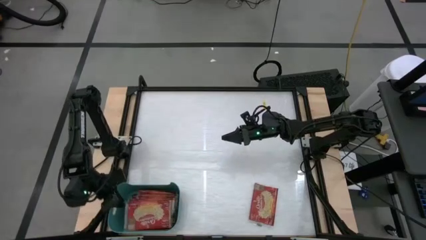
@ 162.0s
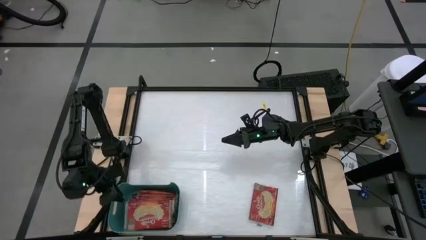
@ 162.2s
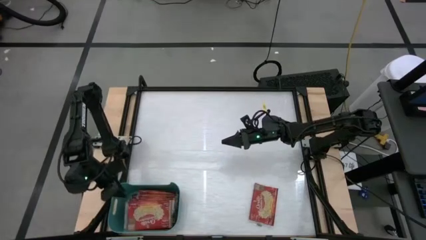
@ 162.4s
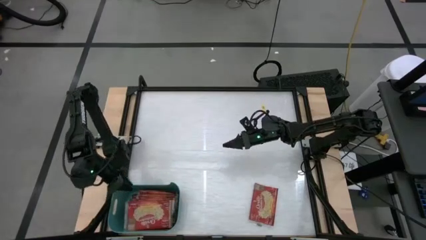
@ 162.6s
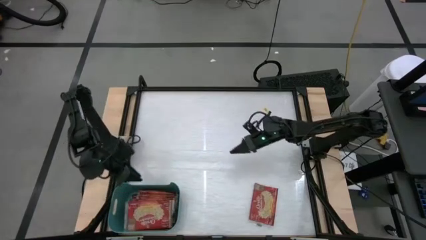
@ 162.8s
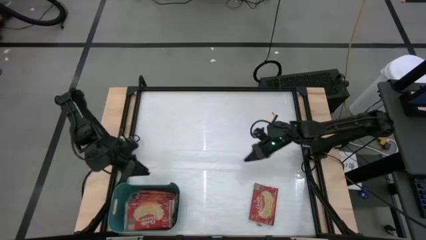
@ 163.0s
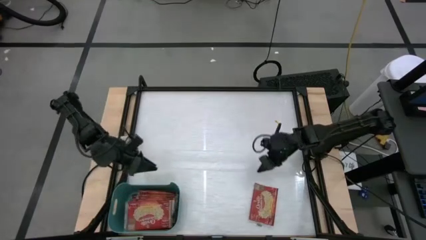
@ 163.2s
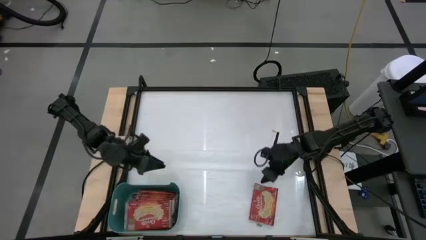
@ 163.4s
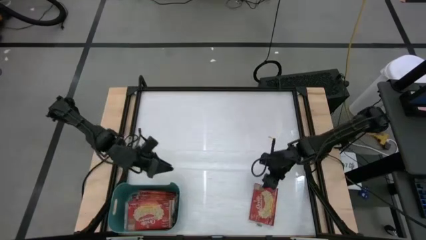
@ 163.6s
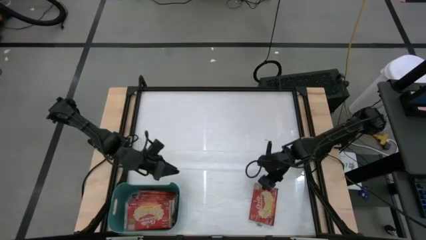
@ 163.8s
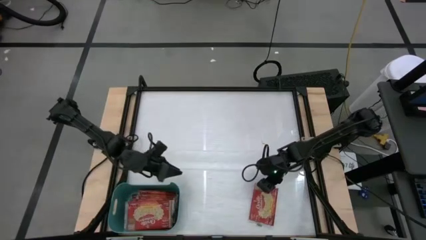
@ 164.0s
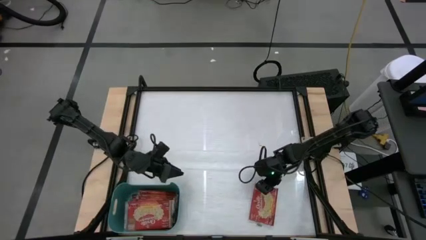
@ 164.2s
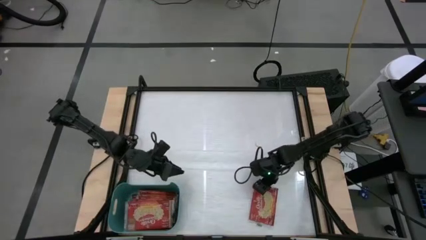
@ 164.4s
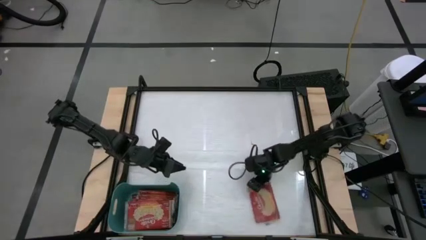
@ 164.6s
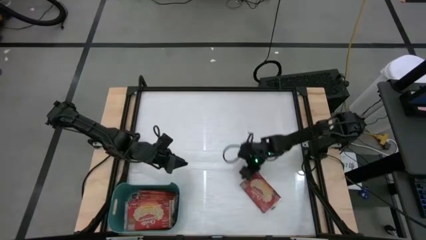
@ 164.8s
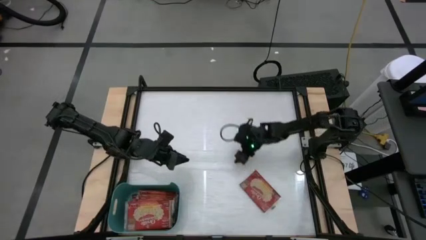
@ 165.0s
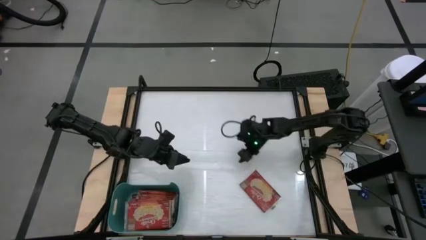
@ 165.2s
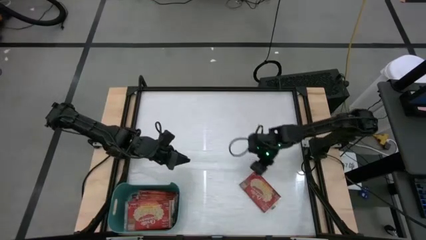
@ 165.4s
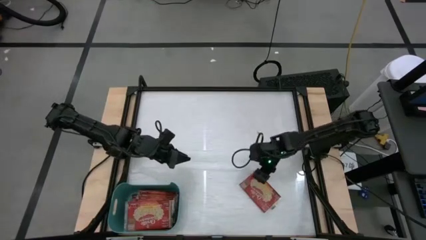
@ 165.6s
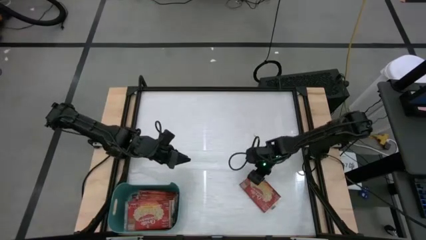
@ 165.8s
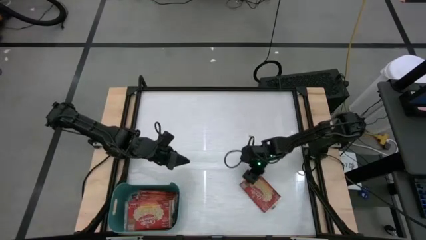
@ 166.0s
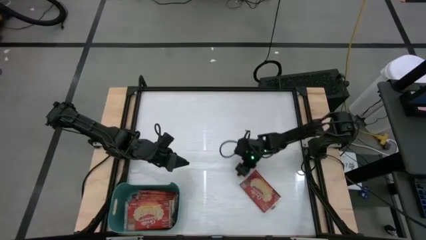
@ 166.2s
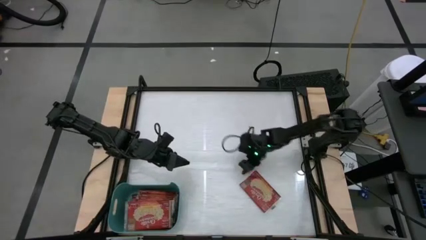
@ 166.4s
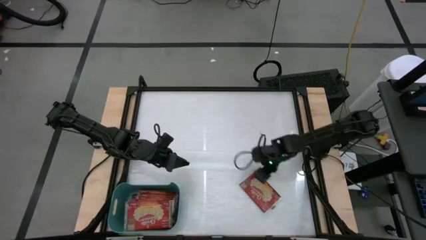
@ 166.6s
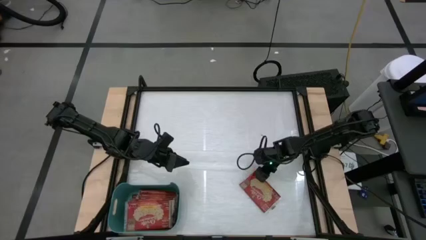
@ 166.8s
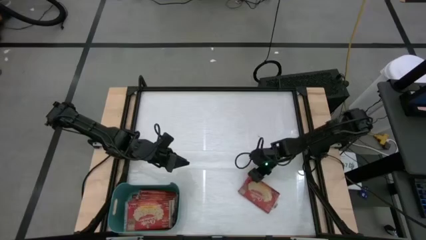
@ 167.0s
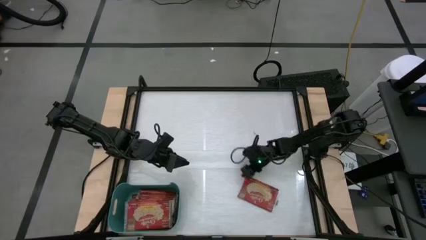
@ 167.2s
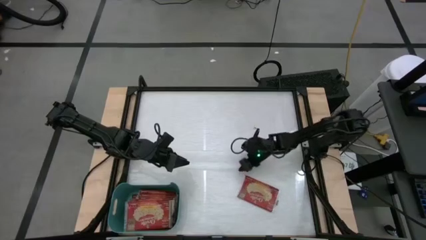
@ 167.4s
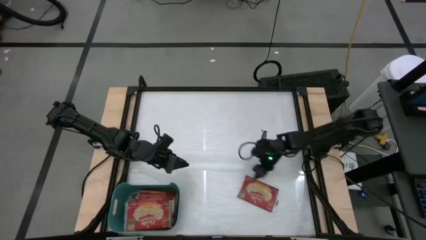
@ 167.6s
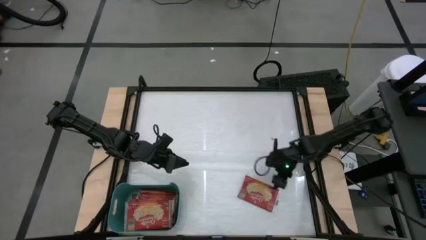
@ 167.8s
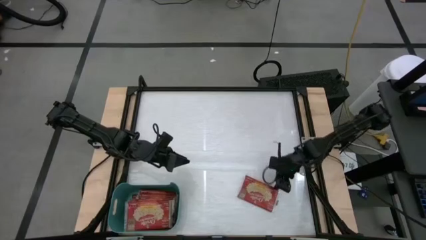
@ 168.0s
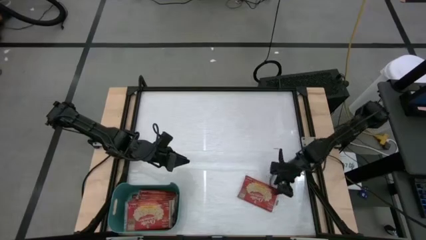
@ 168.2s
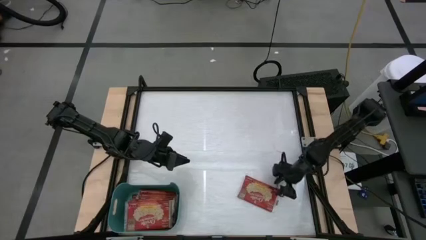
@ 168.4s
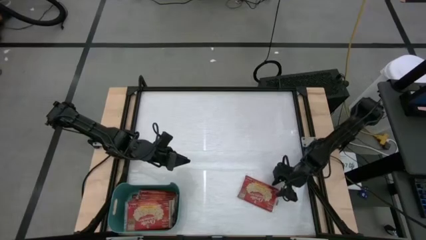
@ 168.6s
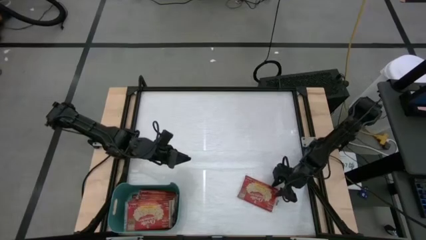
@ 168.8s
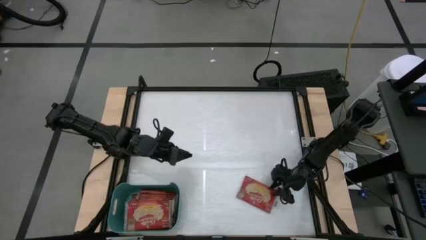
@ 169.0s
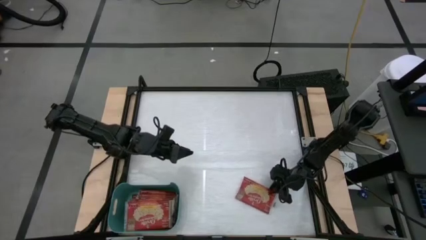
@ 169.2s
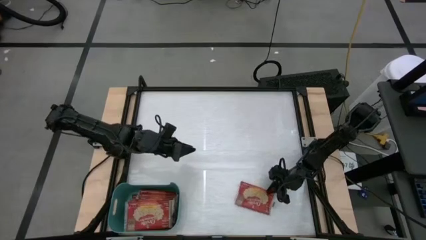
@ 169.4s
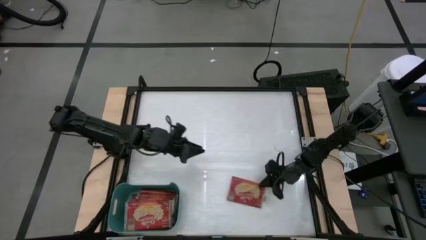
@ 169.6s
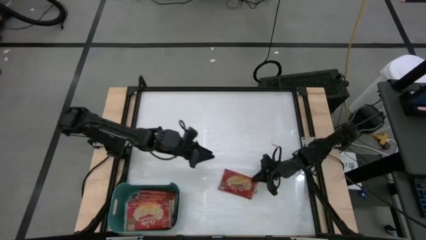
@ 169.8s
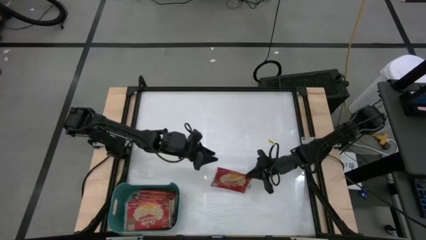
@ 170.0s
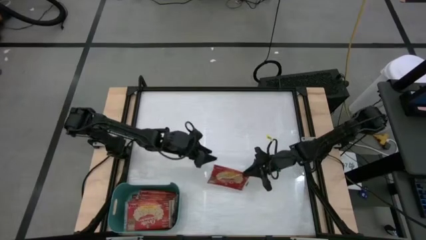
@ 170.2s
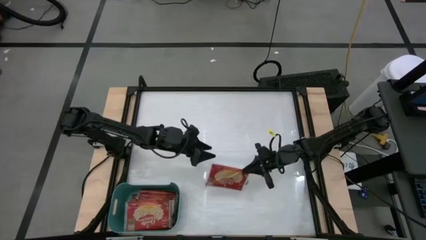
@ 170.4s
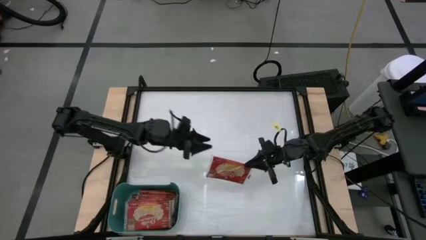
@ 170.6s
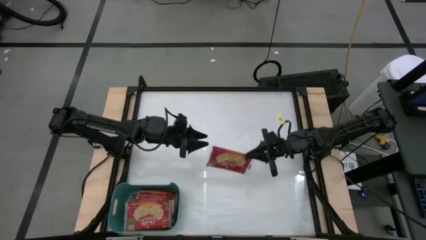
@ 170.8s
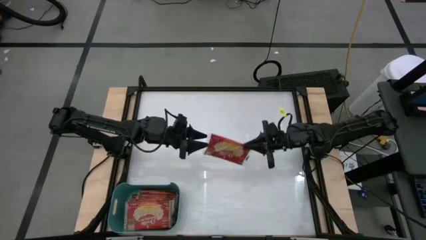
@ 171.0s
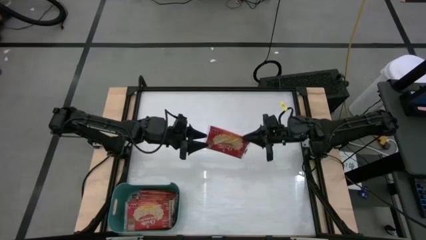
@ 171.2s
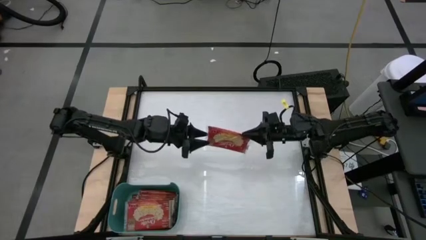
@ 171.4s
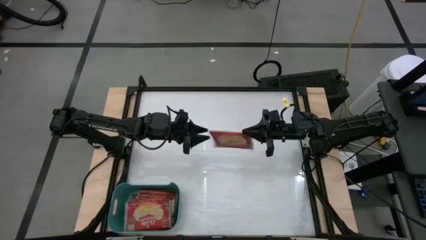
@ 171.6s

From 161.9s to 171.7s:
Task: Sort popcorn bags into baskets
Put the red popcorn bag into the green bin

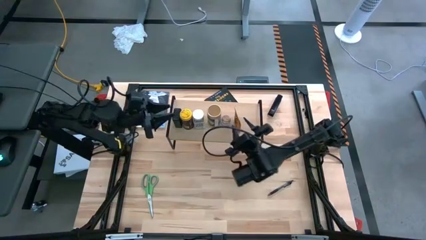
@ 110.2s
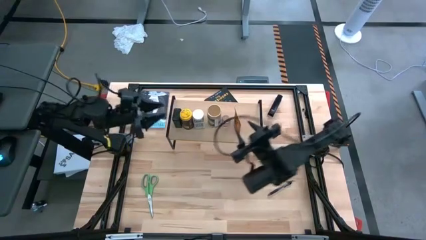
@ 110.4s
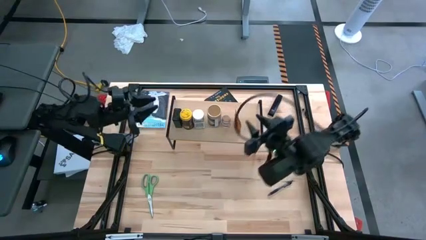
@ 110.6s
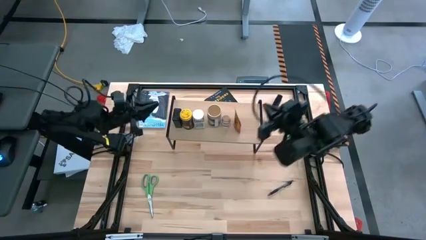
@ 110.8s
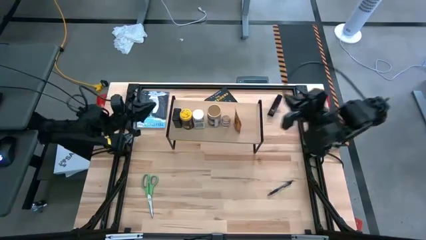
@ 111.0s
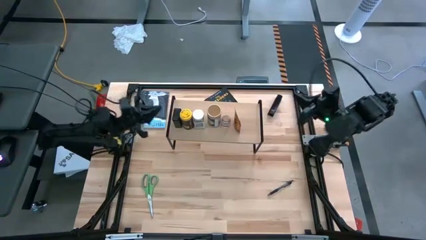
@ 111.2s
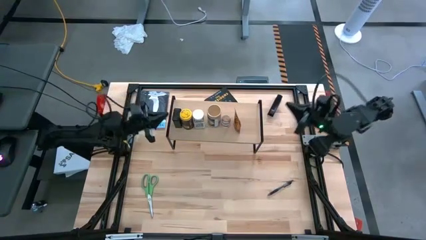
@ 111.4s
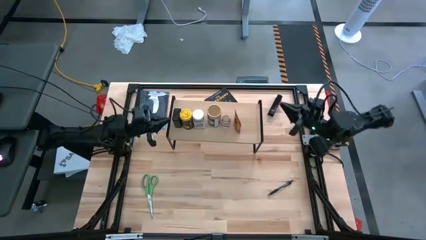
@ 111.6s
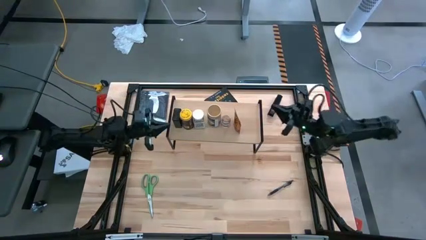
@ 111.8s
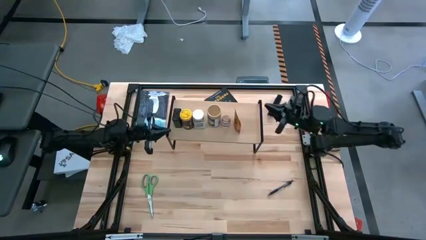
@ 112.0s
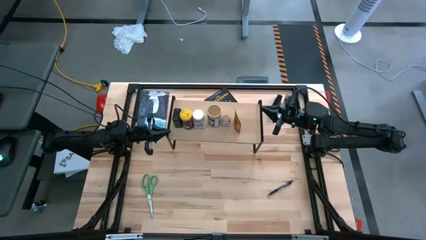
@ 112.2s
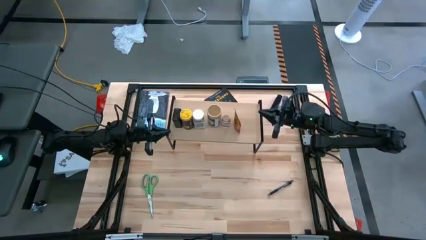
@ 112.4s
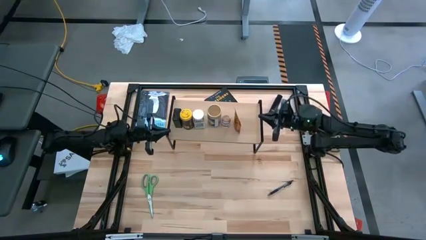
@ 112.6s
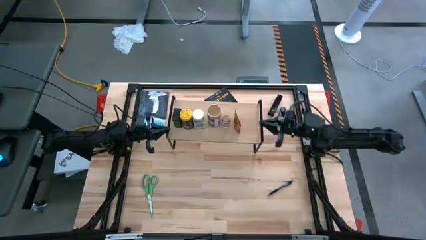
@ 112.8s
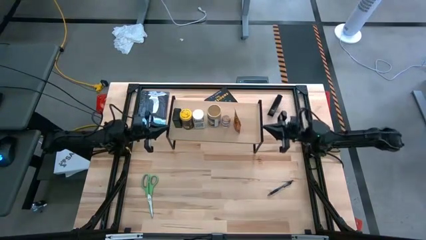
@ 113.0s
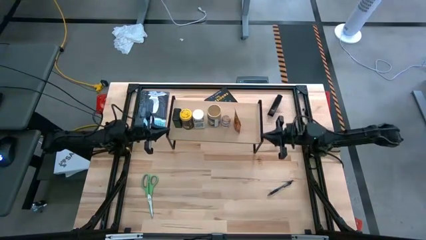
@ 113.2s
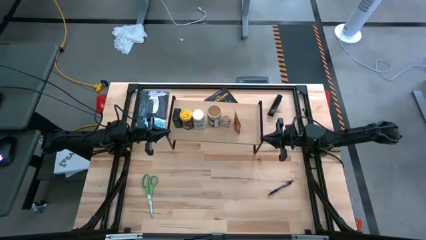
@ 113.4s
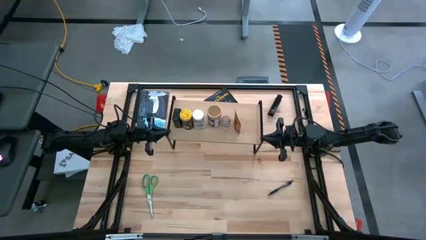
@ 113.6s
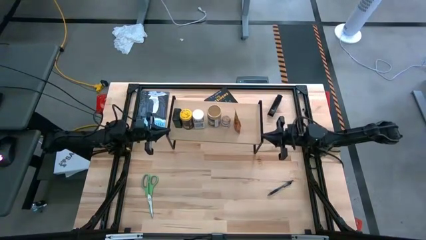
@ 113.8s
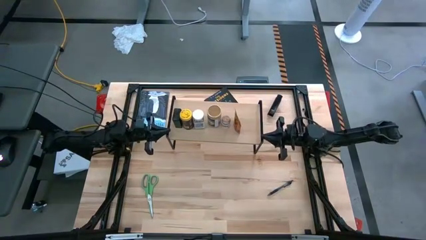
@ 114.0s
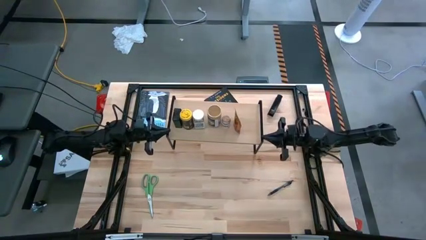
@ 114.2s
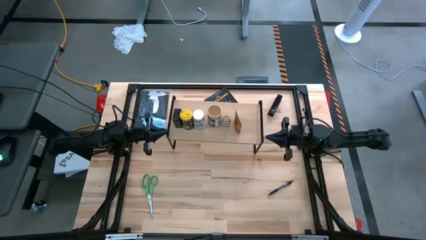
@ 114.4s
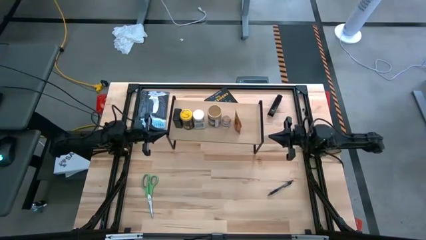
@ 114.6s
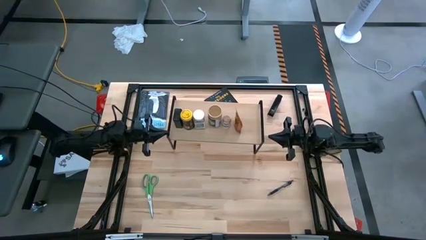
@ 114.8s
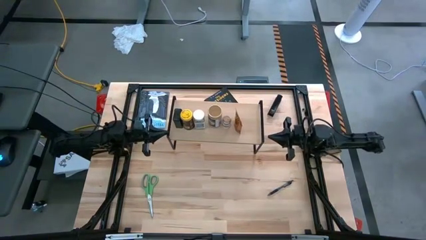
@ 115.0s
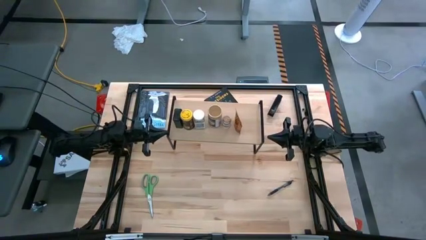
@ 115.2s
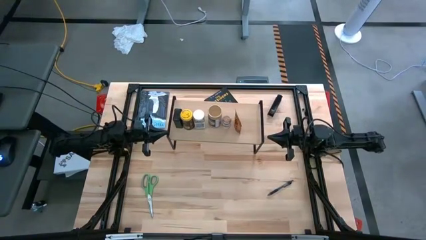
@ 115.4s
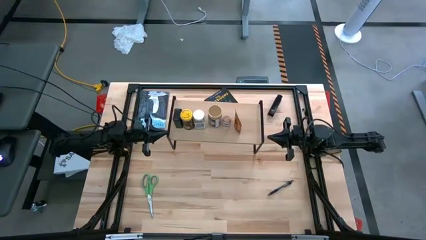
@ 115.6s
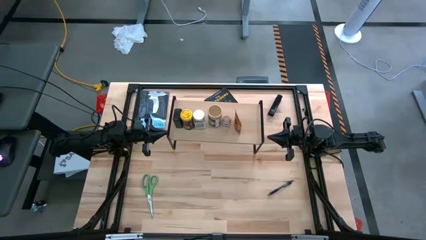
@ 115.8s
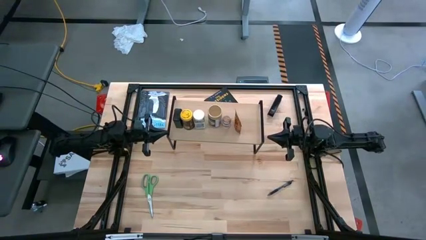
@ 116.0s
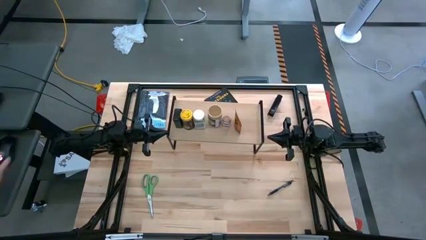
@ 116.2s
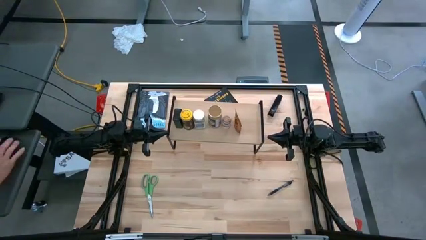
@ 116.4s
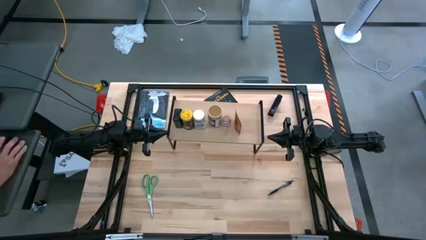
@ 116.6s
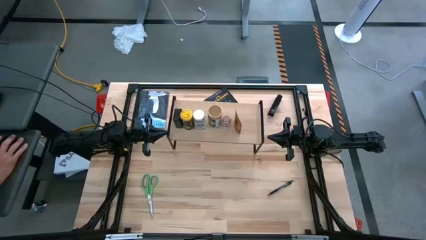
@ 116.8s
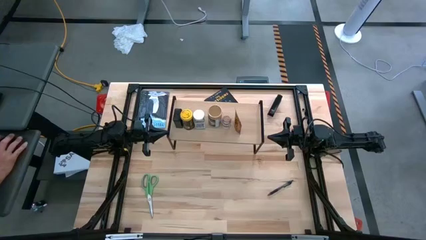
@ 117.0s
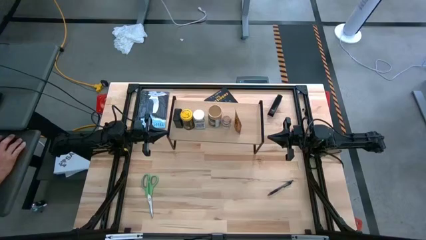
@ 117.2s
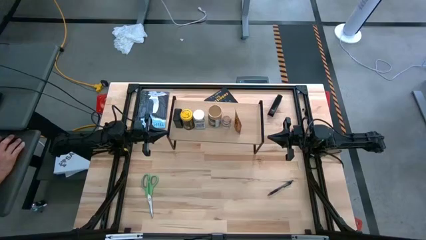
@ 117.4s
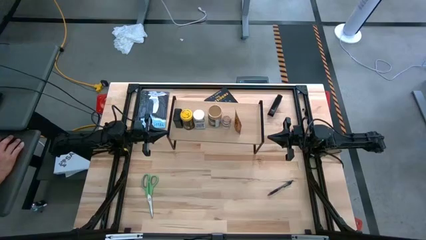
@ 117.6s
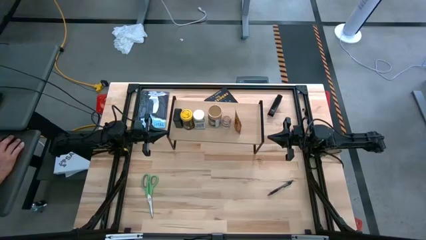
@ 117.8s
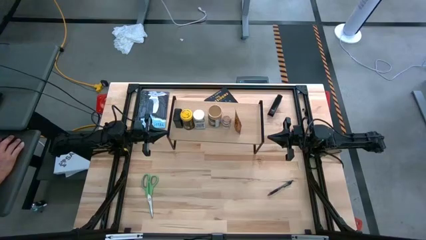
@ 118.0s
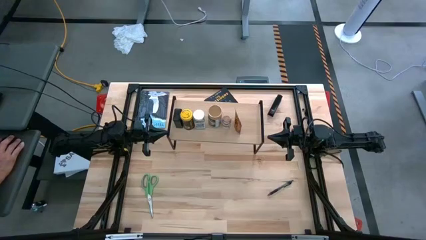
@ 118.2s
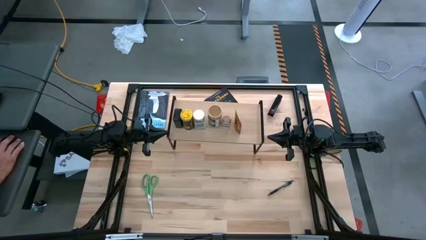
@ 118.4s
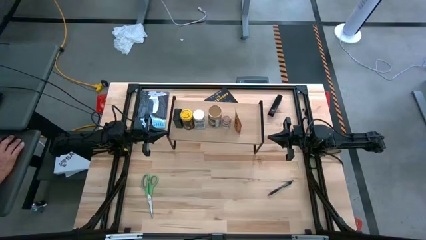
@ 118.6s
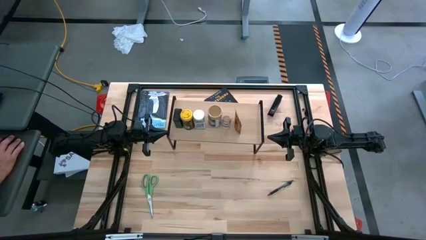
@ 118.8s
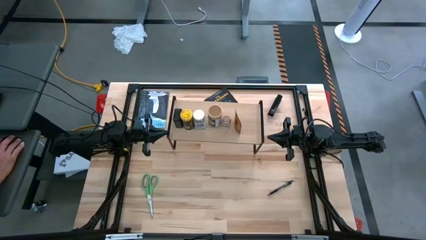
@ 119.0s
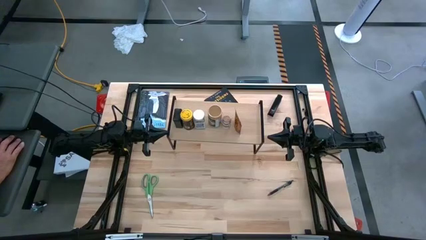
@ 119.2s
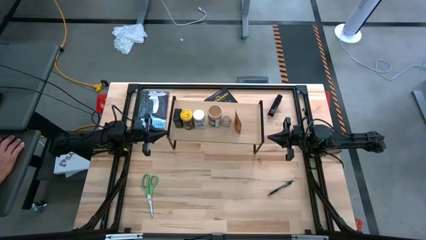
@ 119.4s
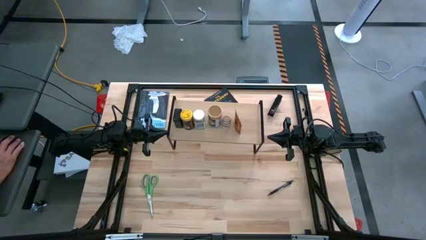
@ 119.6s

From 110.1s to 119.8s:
Task: Shelf spices
Return to Home Position
